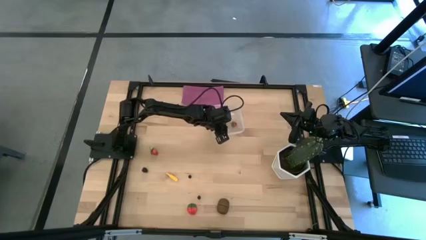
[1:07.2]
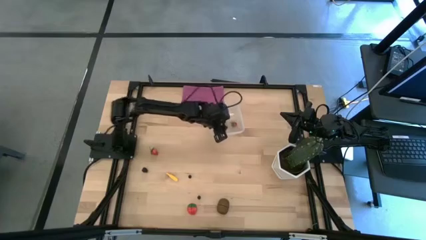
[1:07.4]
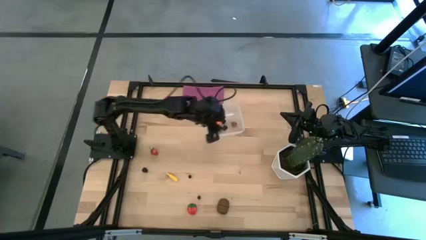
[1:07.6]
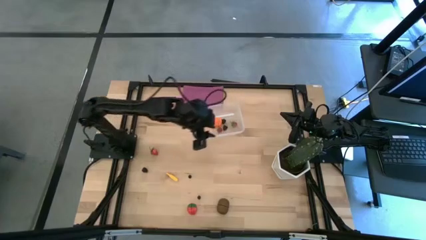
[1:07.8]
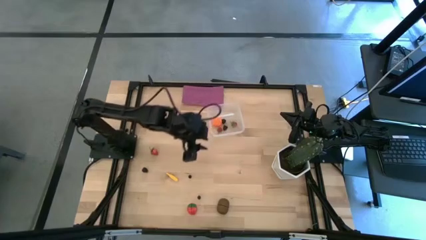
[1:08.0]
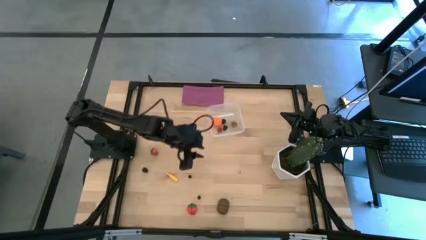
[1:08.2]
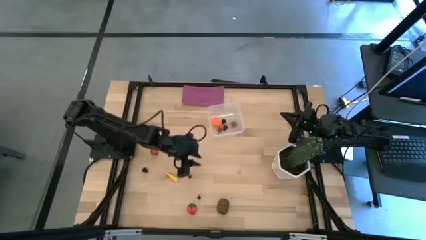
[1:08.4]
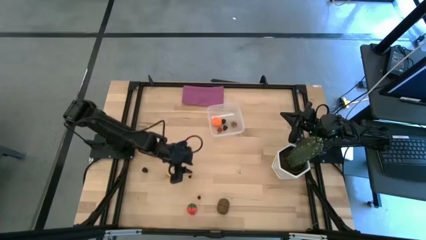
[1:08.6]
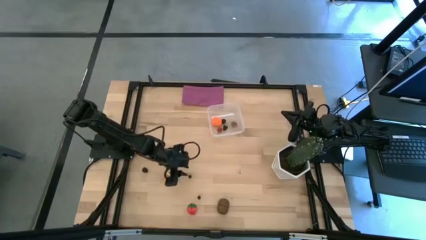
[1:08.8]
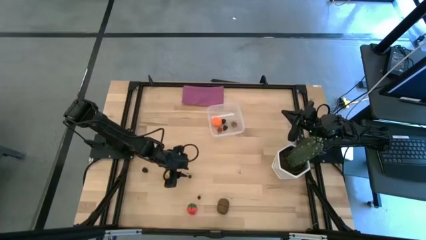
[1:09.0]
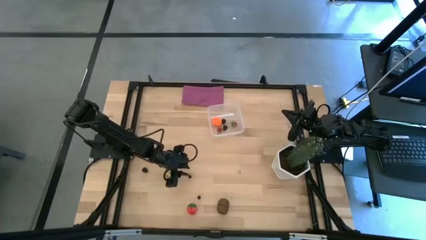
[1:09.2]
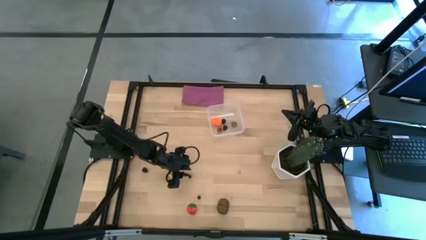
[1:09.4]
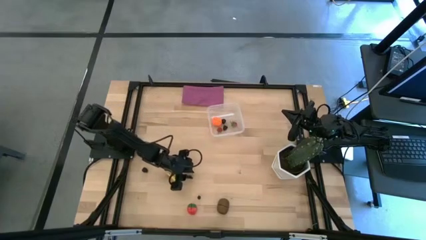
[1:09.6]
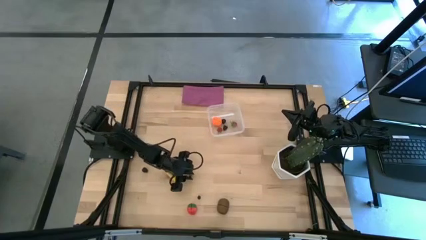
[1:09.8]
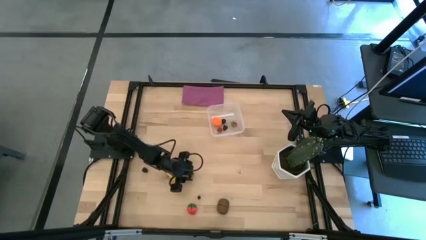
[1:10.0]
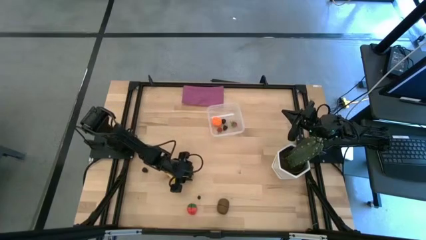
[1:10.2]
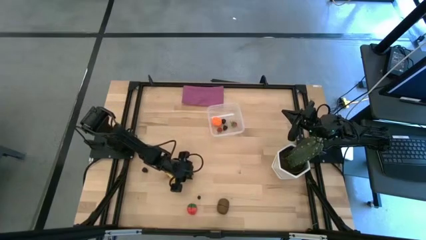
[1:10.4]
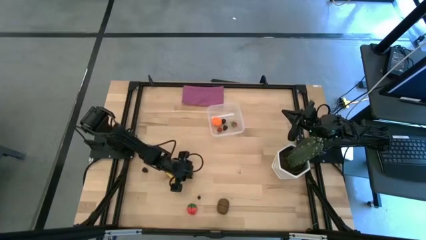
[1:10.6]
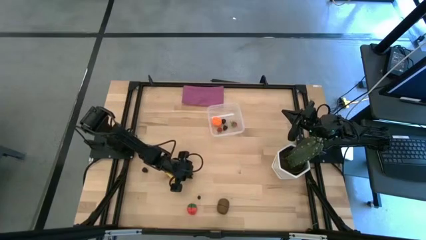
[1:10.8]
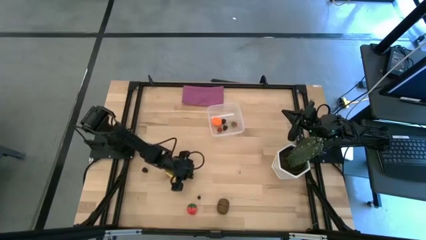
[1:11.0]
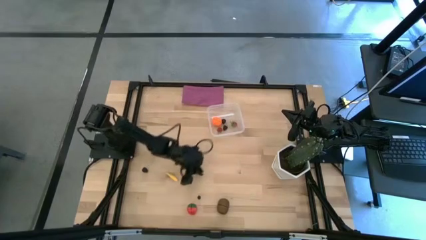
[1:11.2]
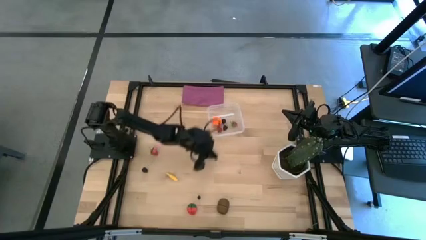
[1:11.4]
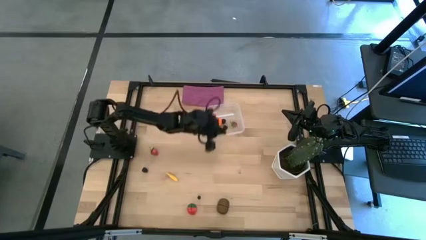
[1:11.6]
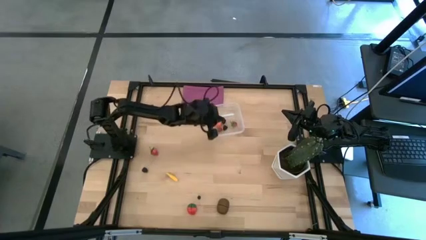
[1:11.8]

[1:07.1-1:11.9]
Task: Pick and placing Produce into tupperware
Put the top blueberry into the transparent bin

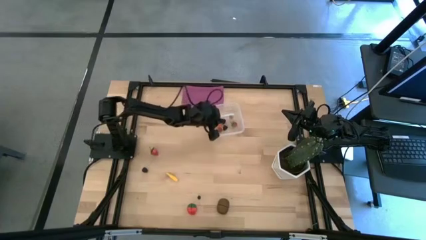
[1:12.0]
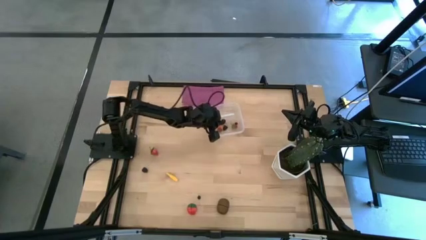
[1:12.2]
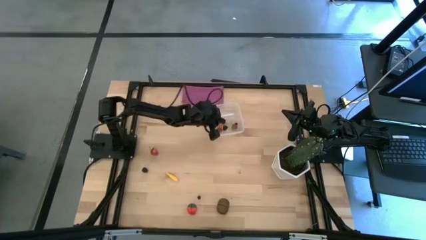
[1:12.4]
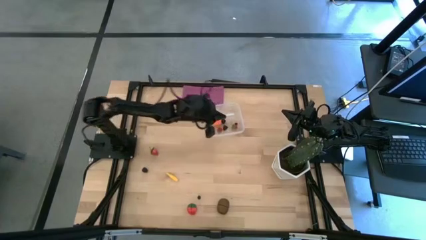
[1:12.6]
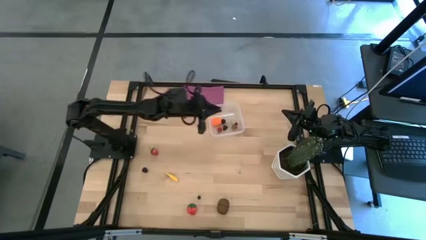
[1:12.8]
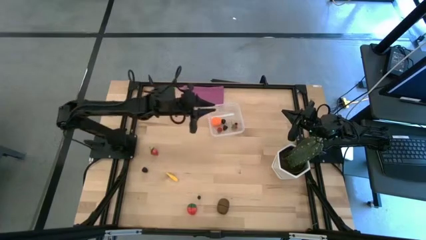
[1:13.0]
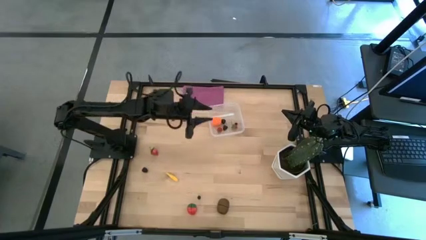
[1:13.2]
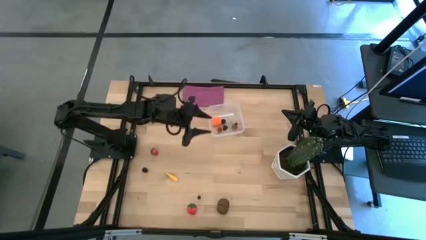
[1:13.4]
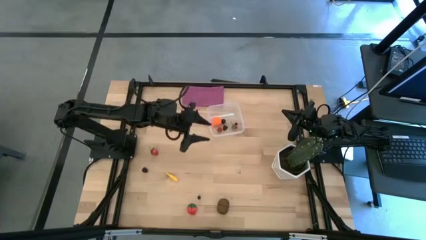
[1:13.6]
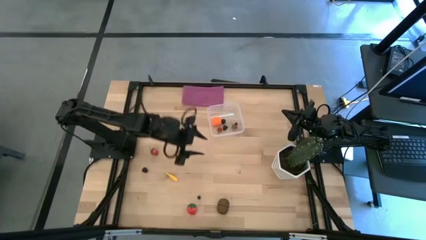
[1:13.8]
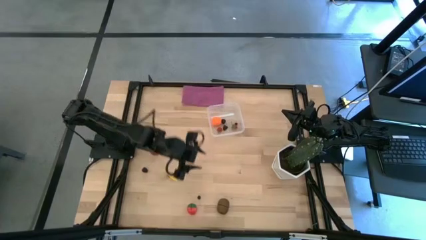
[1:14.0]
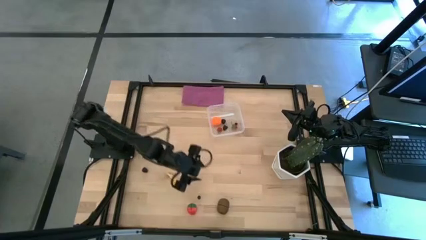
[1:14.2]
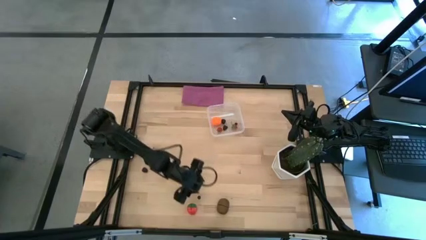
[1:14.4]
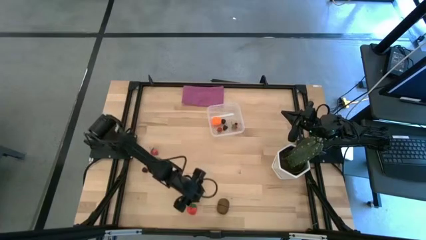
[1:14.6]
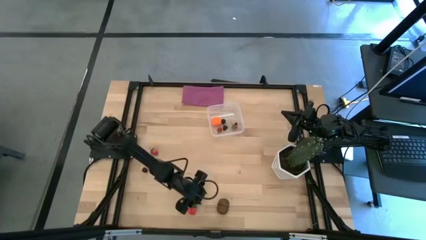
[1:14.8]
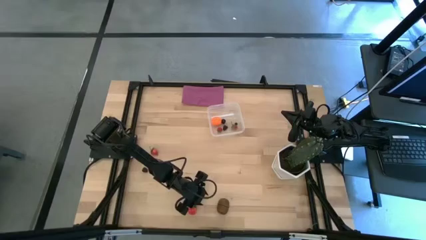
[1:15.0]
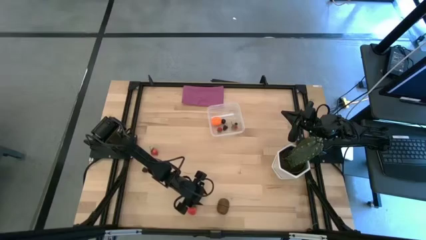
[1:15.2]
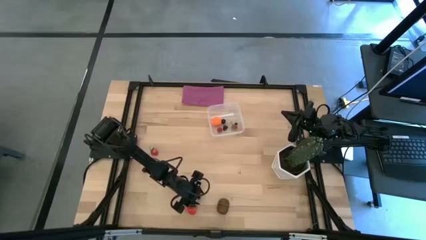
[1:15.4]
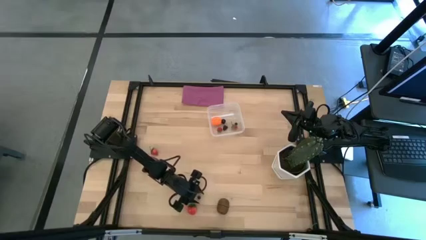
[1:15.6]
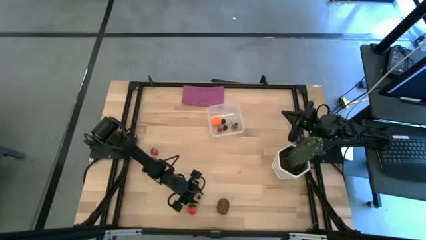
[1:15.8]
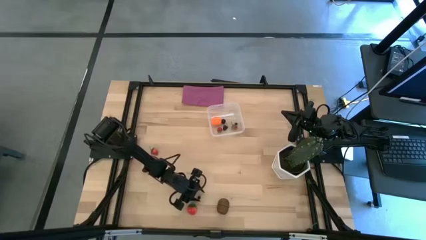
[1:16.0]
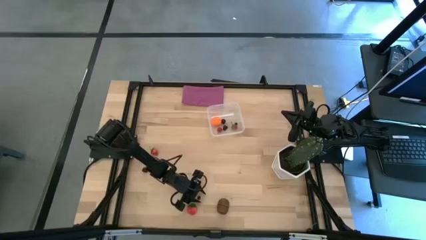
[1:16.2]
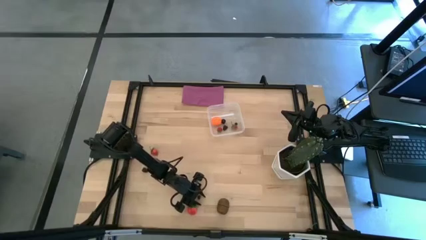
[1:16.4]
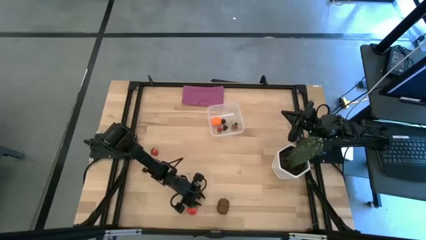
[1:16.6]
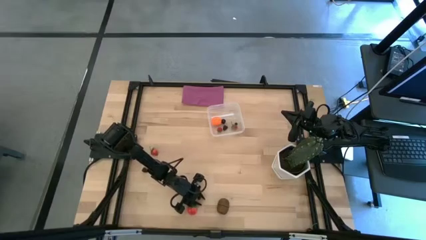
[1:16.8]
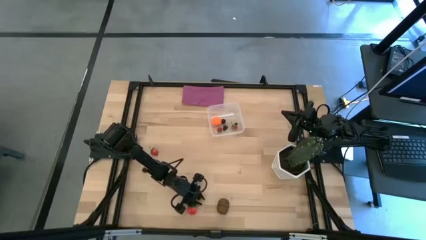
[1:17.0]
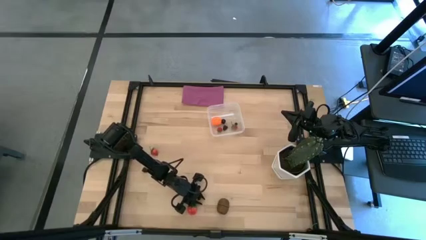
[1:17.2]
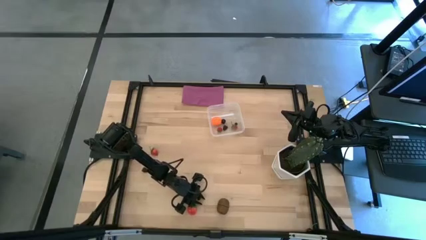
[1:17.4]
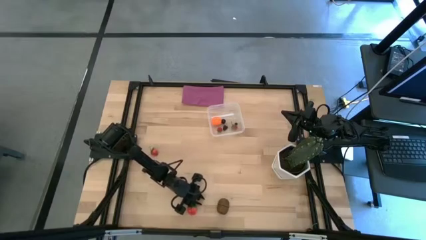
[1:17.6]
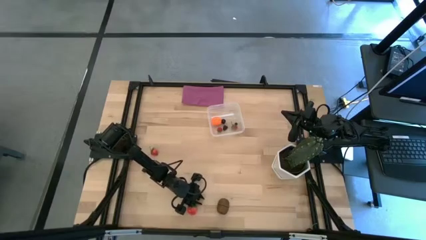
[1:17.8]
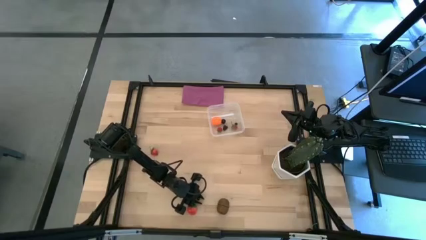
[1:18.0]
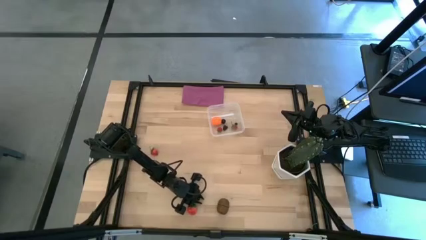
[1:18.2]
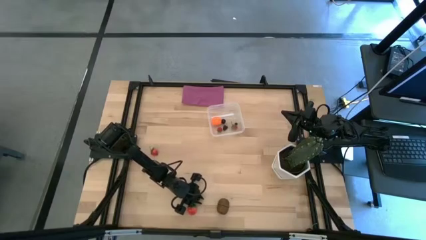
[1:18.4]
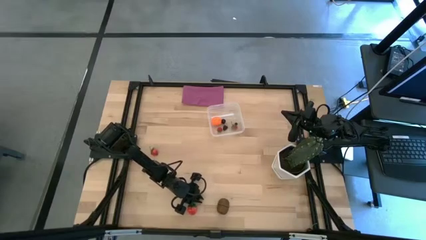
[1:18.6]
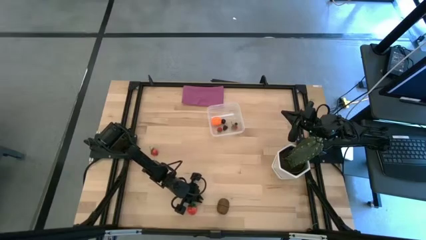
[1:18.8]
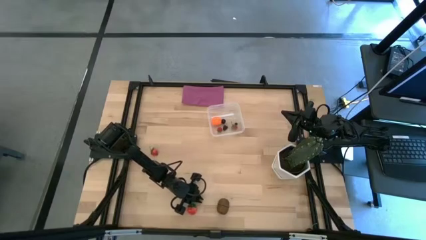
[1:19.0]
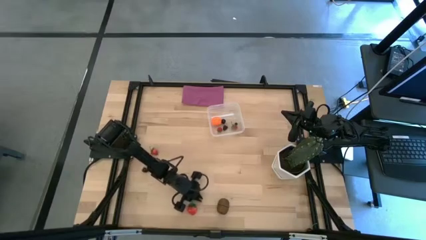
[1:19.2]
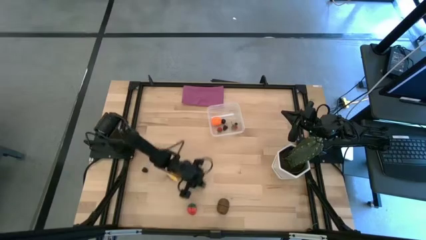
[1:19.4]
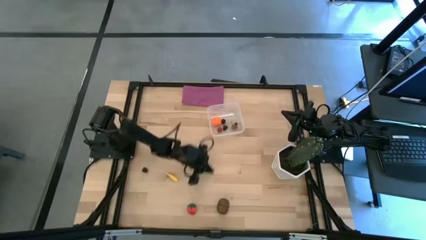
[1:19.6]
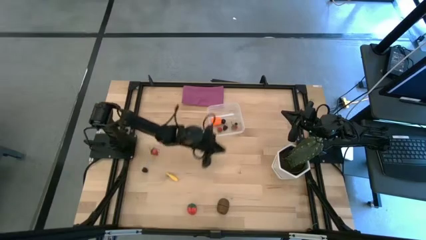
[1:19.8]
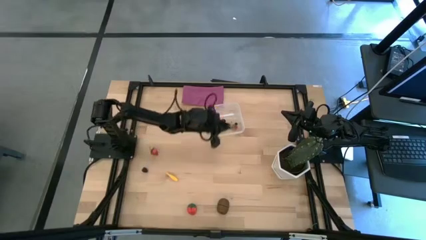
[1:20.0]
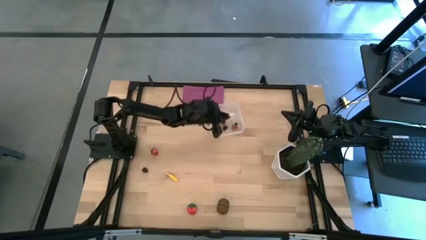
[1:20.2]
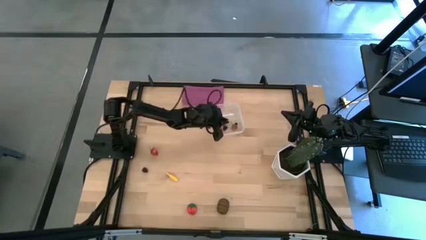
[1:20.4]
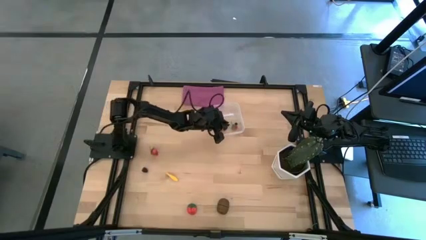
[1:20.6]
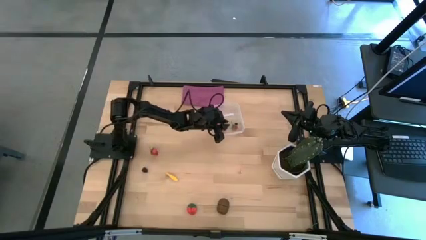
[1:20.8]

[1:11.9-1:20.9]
Put the blueberry into the transparent bin

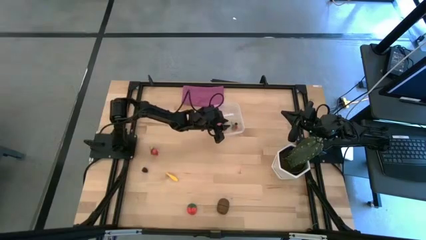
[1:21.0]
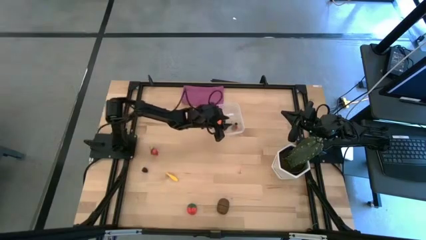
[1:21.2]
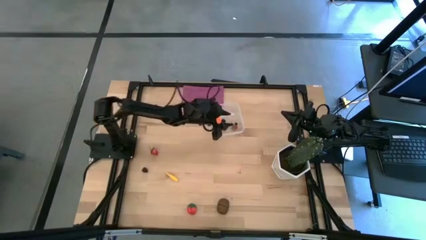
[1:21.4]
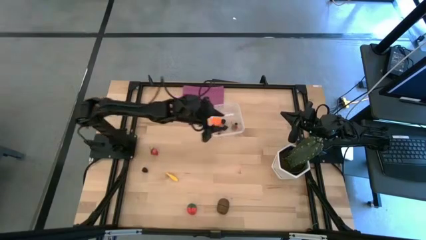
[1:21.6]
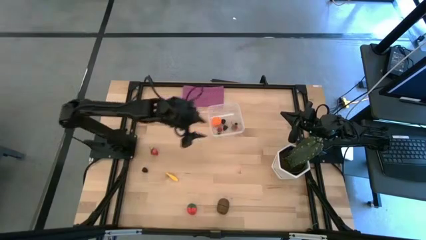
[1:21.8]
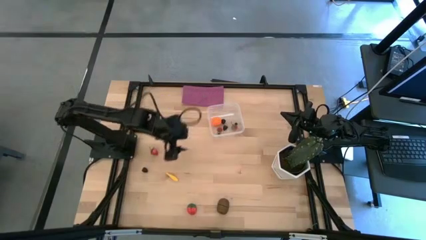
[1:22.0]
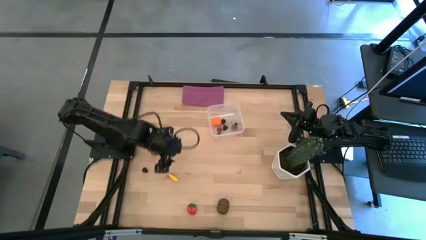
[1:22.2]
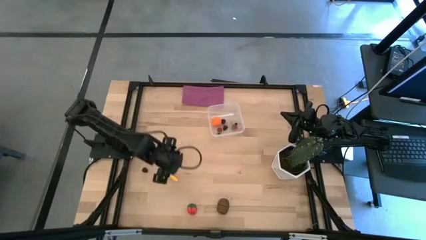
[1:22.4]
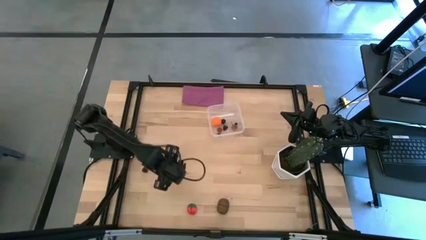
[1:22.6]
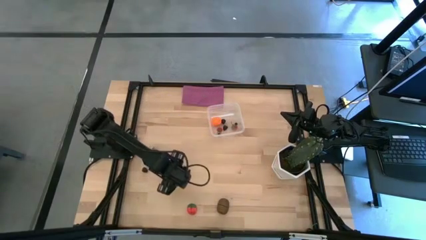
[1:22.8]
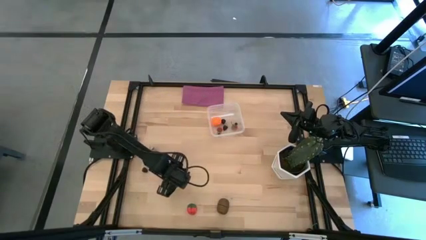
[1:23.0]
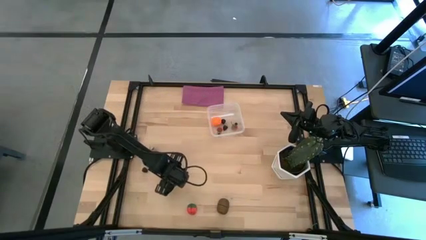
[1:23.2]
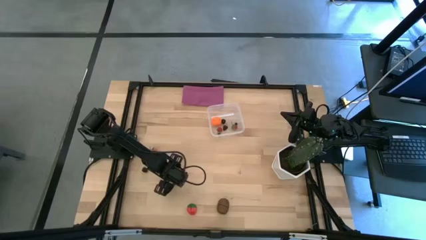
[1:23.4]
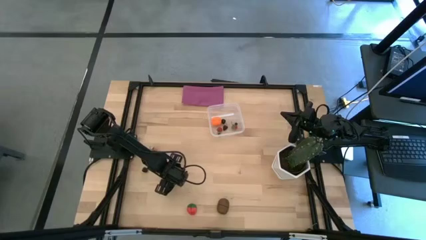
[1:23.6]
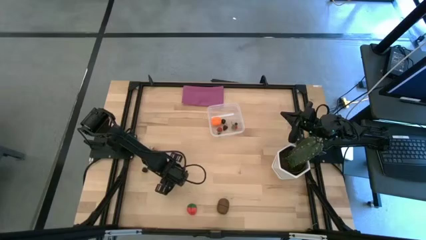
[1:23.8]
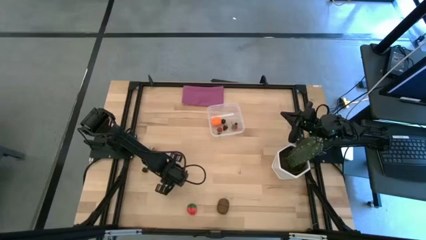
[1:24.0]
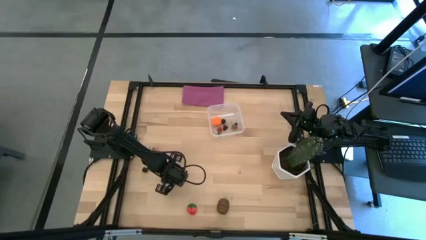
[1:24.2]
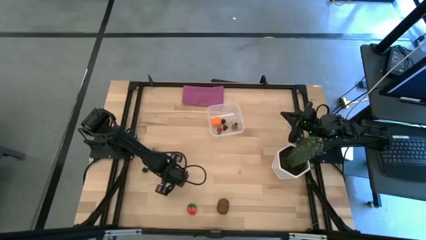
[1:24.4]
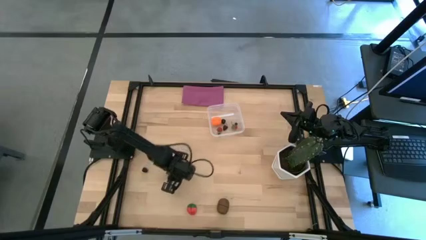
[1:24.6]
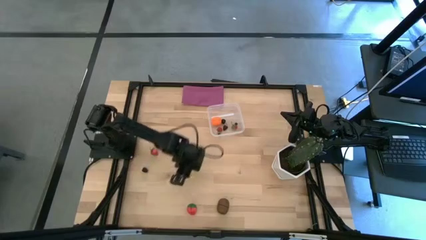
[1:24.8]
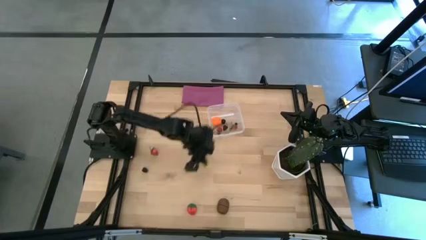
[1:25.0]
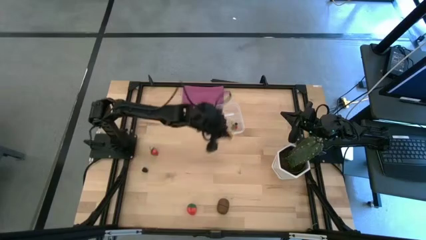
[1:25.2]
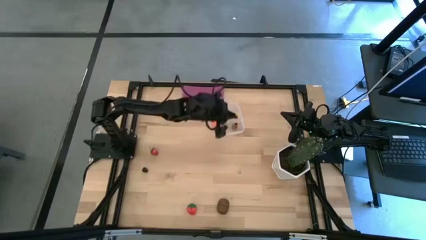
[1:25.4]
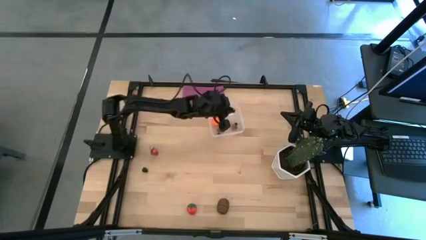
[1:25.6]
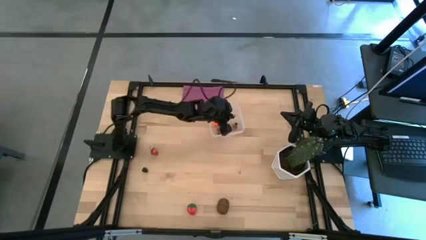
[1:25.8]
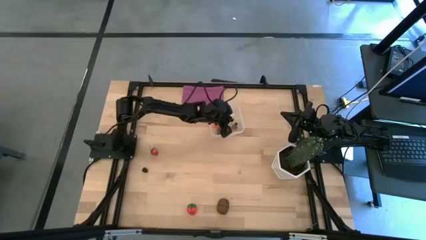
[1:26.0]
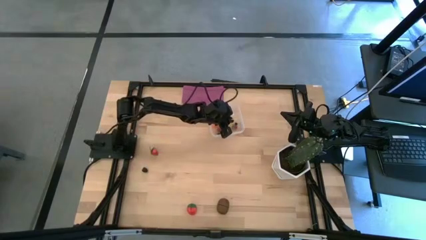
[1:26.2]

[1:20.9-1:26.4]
Put the yellow corn into the transparent bin
